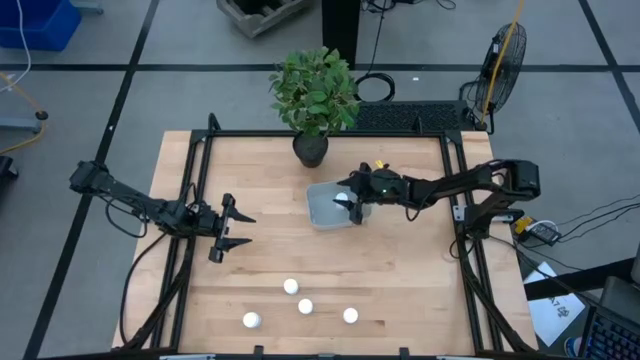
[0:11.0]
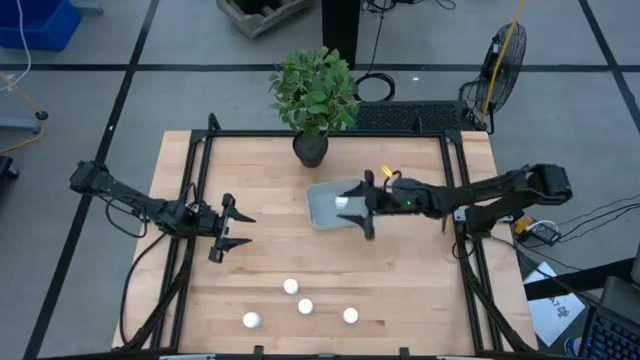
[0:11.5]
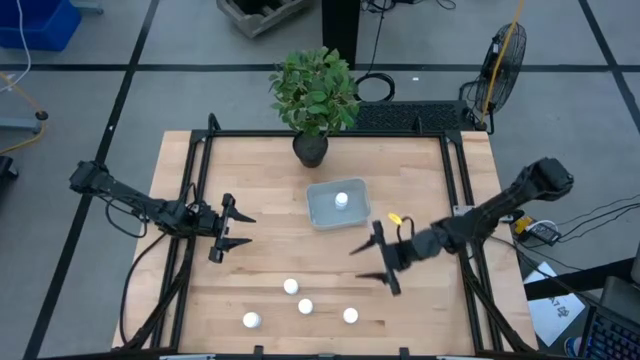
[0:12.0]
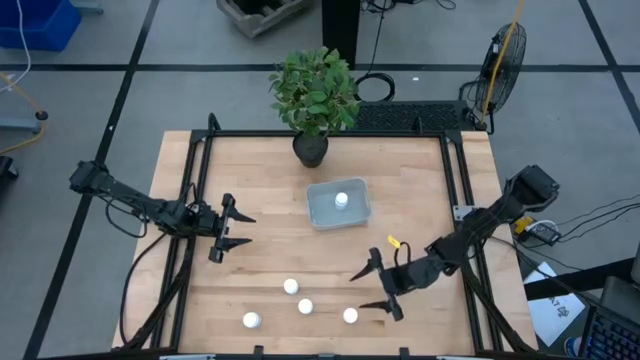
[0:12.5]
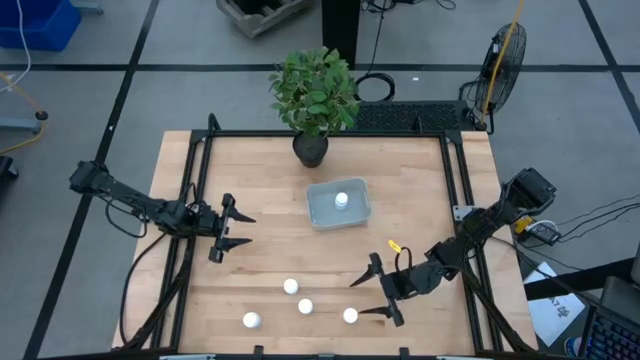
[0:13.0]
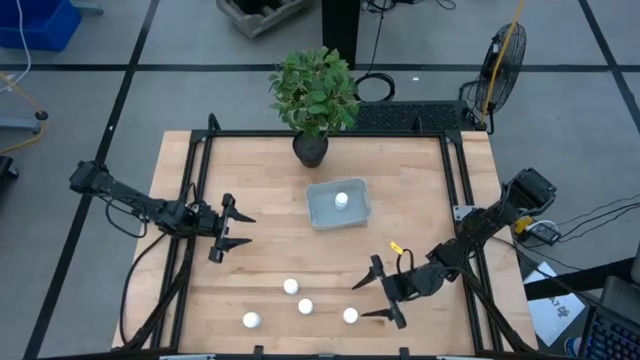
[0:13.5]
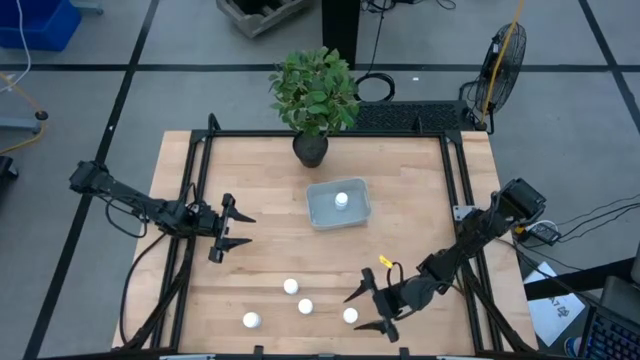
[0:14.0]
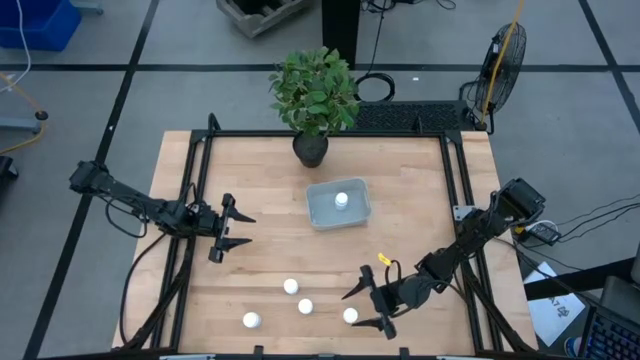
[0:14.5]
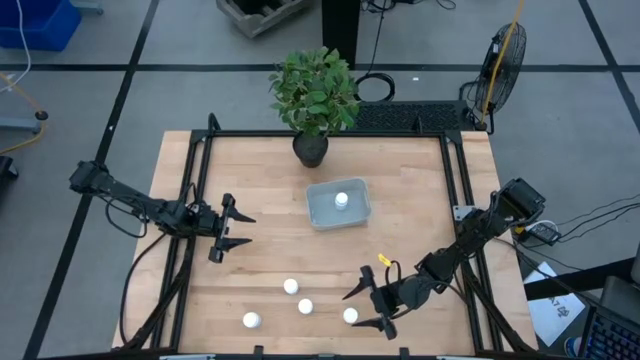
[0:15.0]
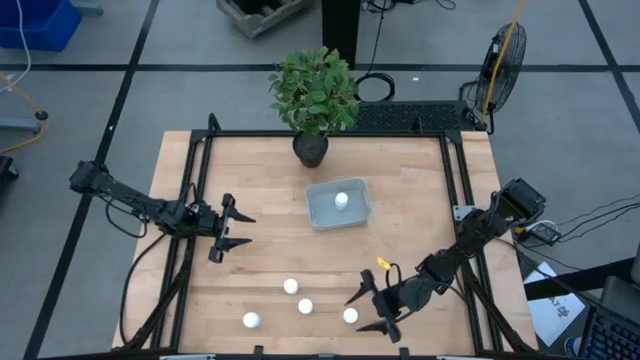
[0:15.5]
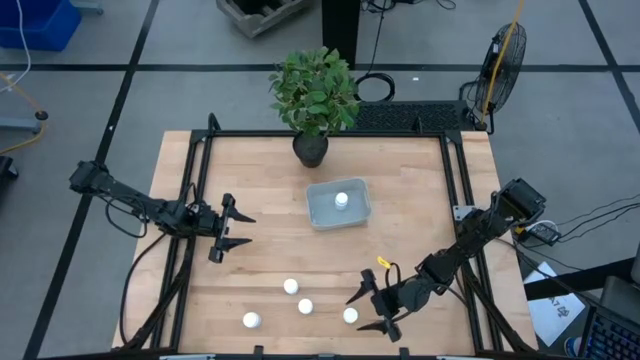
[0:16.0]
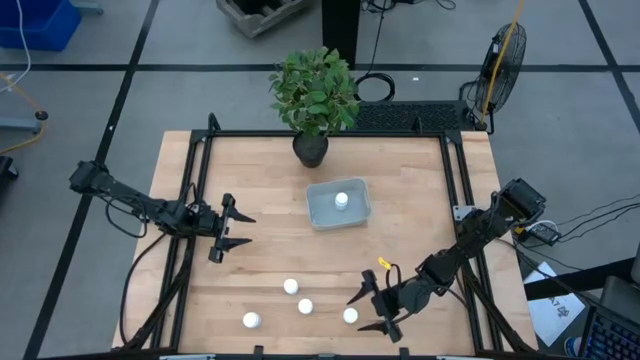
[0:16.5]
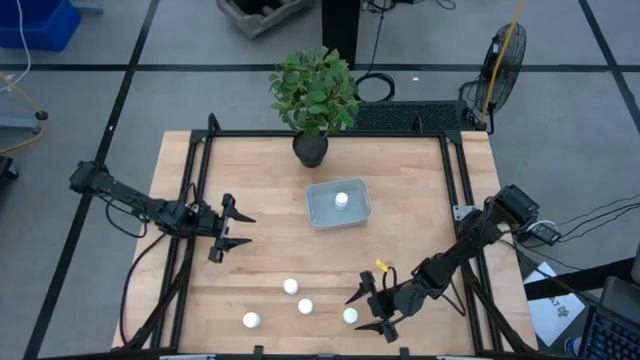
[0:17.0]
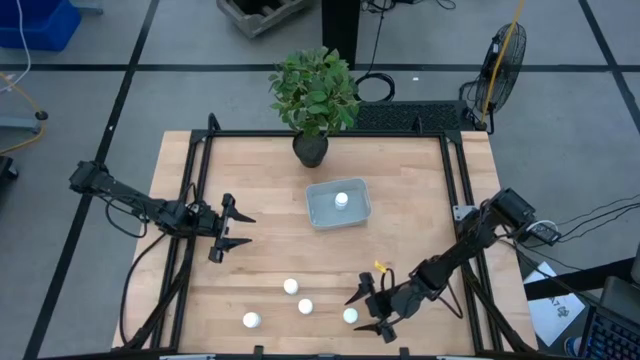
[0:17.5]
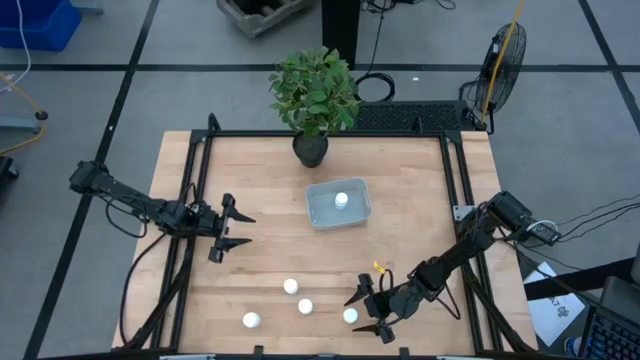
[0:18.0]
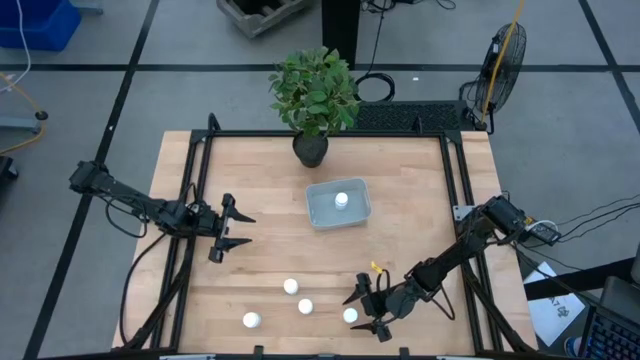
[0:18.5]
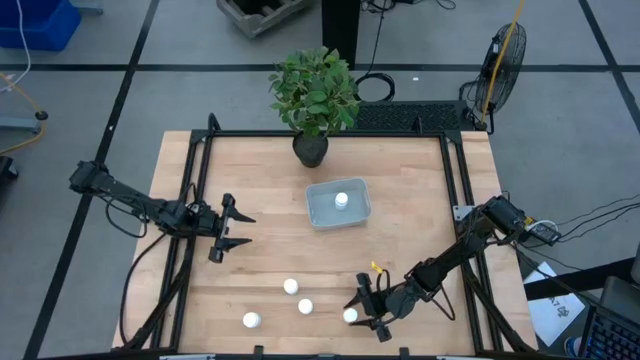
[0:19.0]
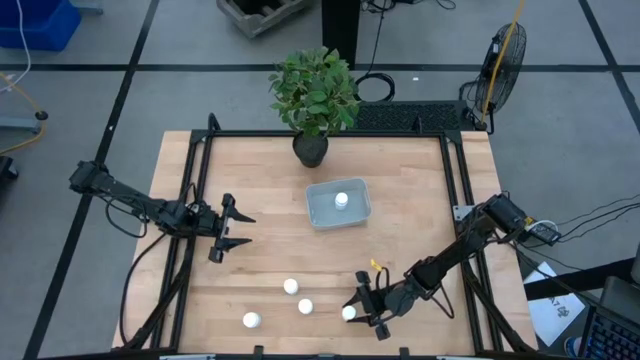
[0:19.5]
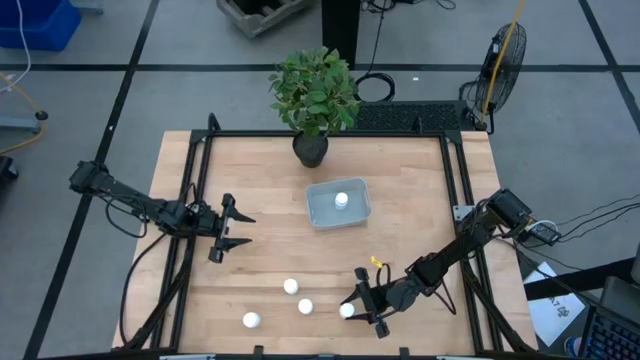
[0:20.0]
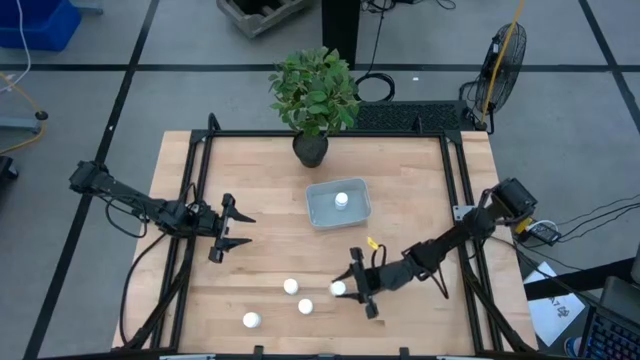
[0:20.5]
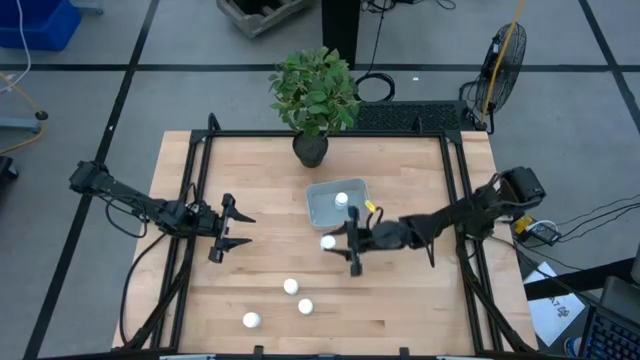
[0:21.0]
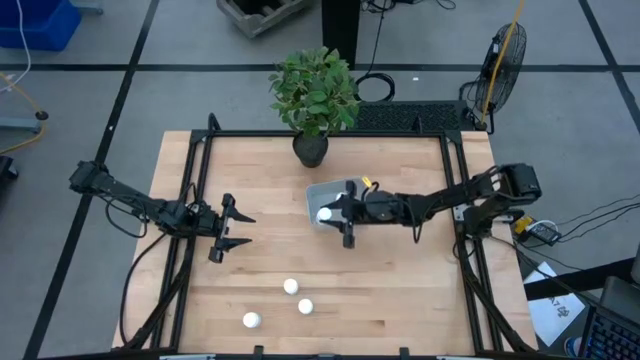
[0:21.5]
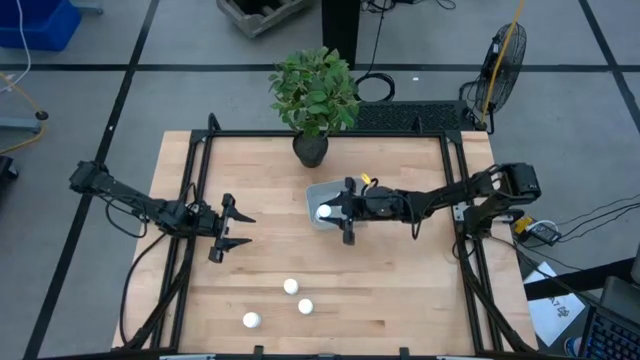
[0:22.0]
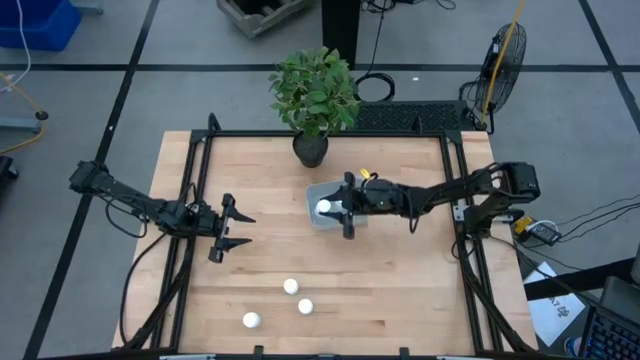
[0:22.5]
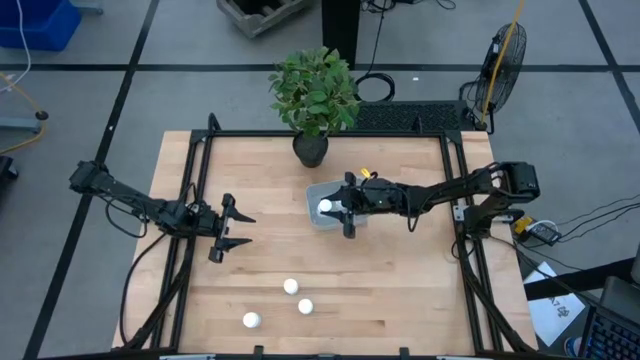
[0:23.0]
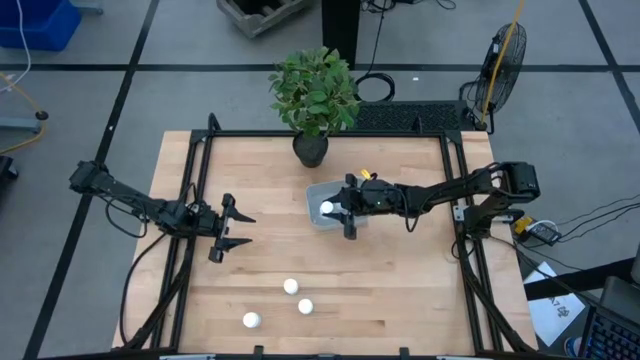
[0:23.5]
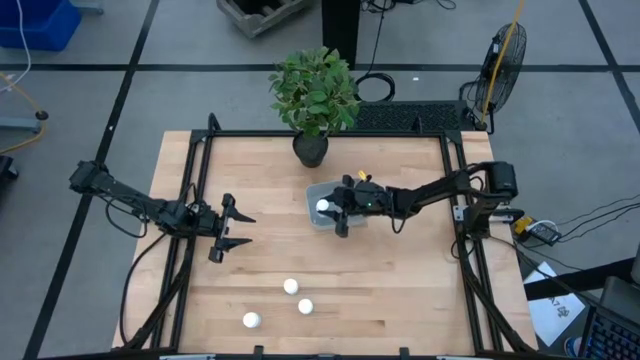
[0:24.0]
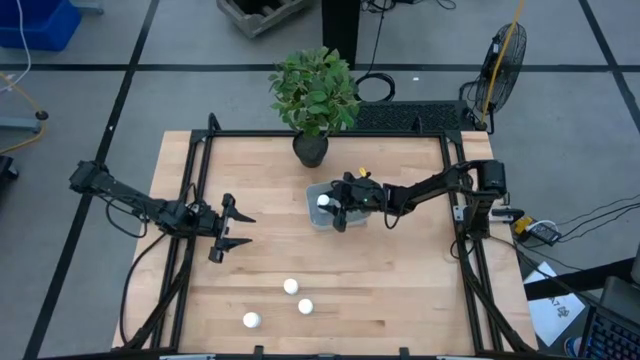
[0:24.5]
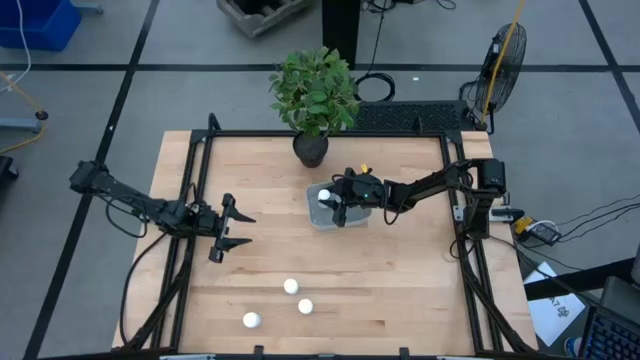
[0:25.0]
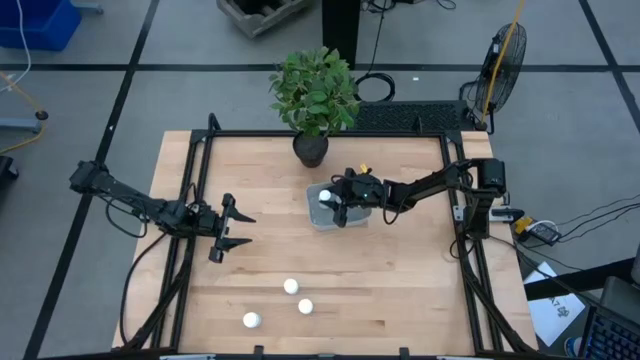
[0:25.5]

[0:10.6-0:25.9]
Task: Pick and place pill bottles into a basket
Put the white pill bottle into the gray bin

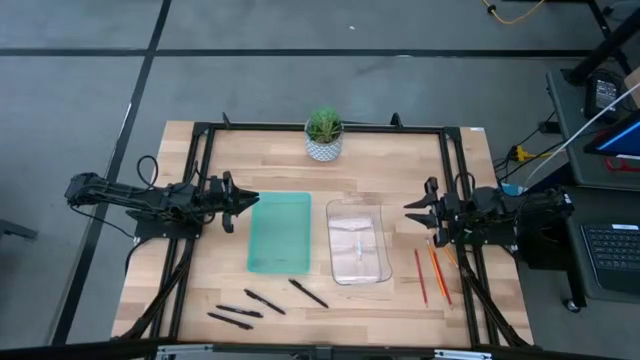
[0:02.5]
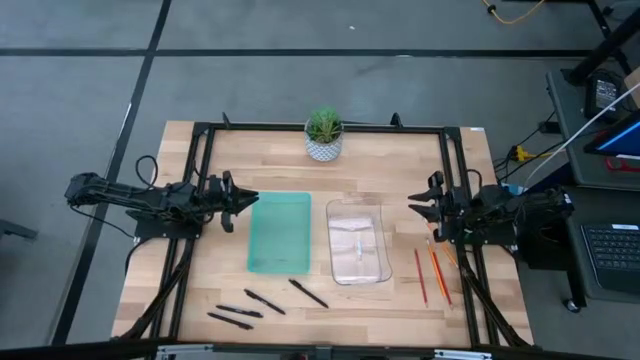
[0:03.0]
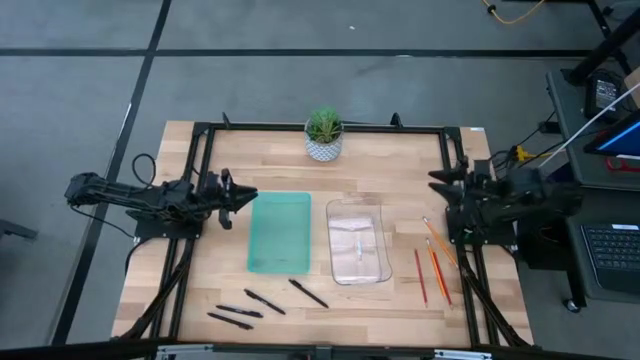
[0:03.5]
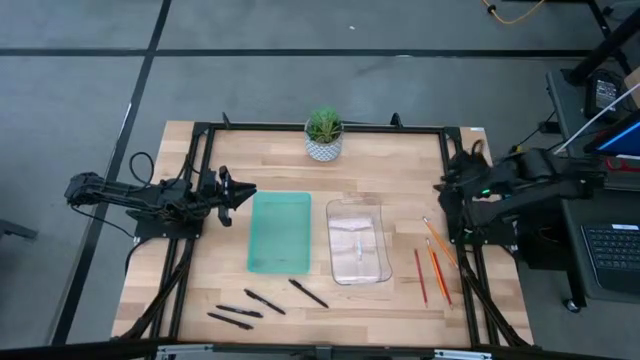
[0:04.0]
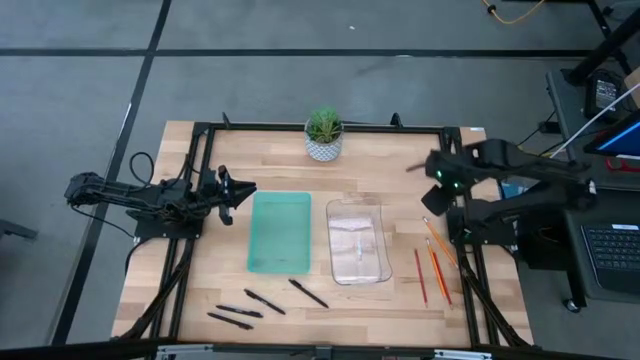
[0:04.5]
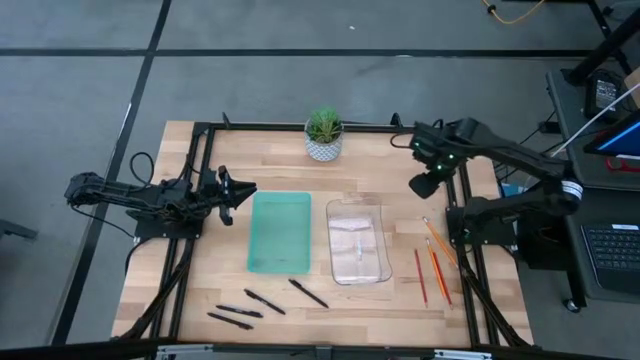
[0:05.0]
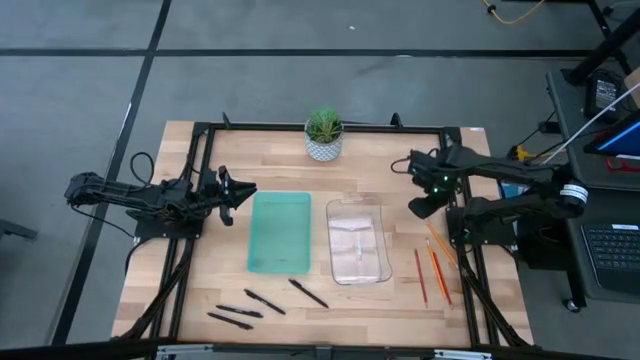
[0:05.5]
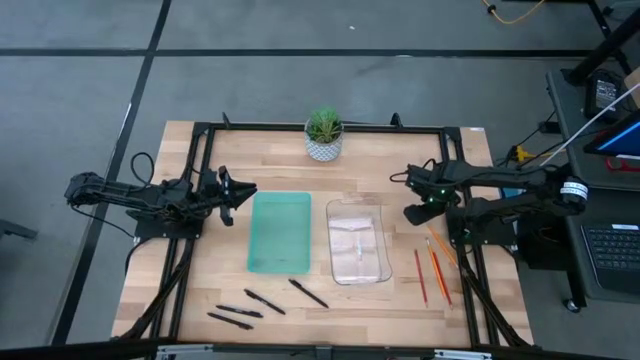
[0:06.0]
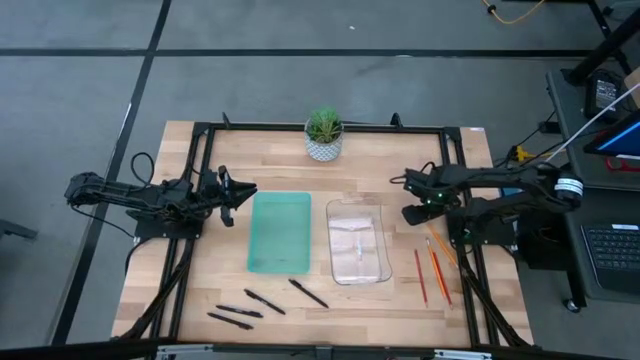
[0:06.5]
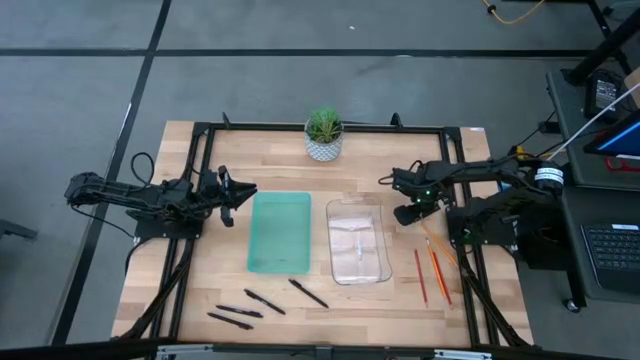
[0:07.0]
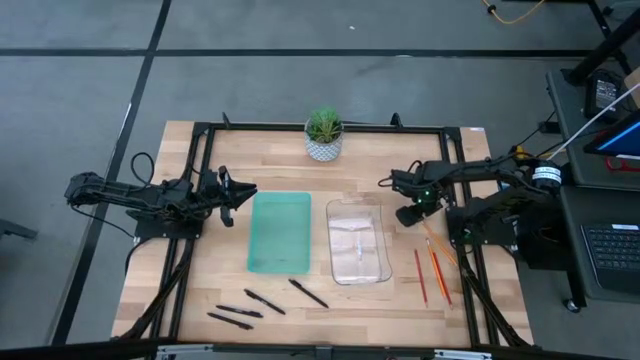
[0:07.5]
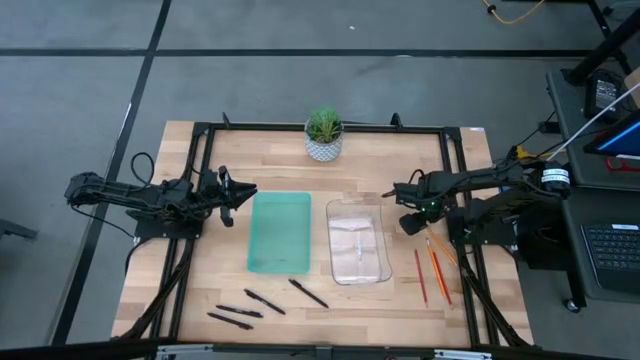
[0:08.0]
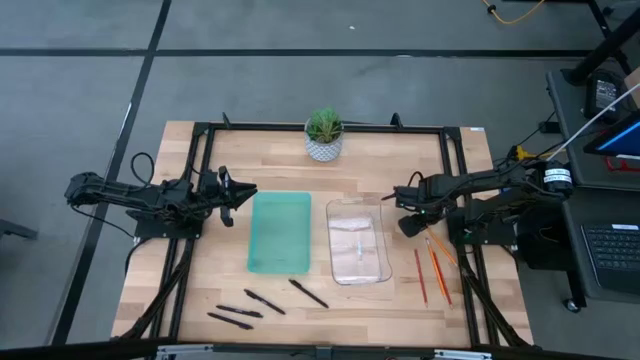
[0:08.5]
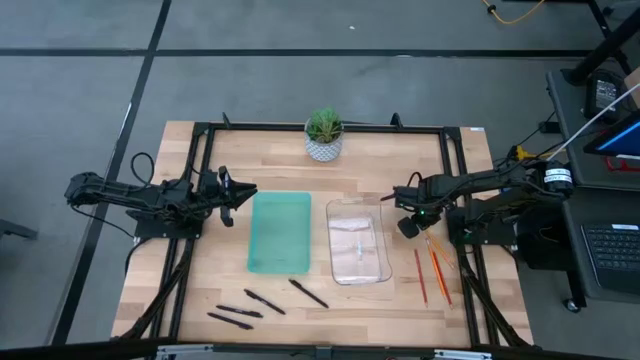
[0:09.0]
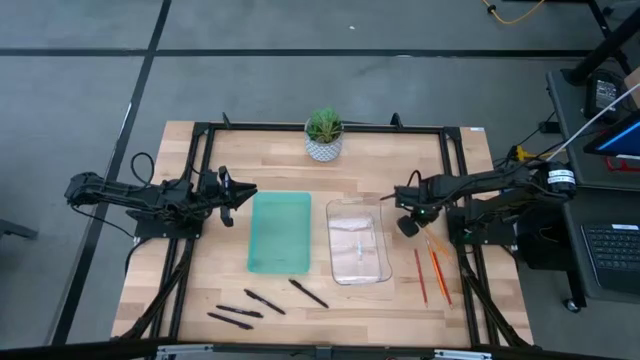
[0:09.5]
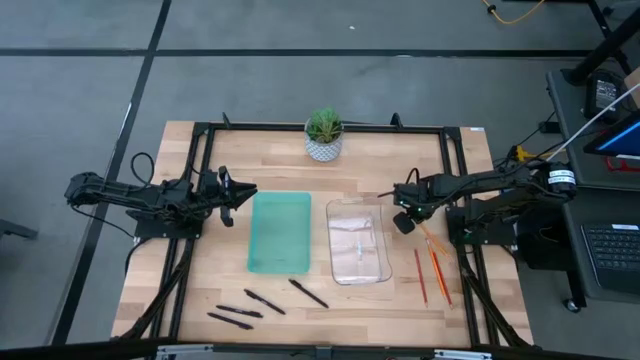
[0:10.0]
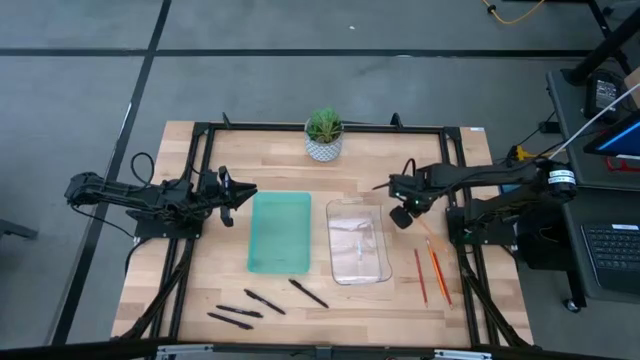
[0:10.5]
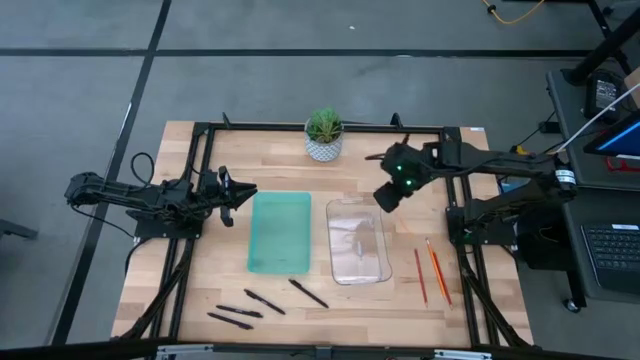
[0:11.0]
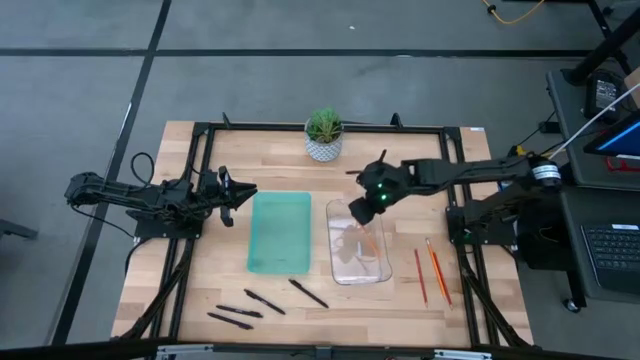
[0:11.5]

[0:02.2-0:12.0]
Task: Sort pens & pencils
Put the orange pencil into the transparent bin
